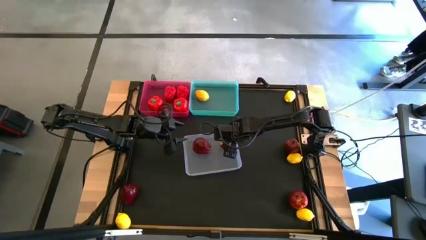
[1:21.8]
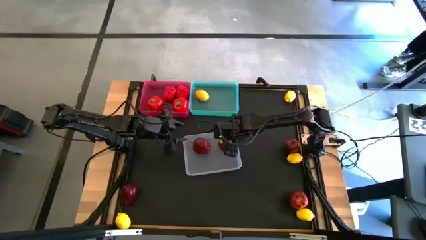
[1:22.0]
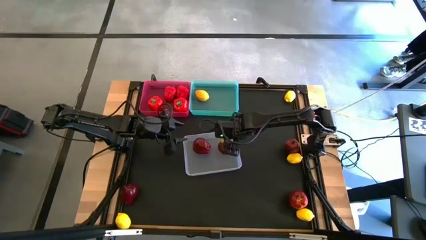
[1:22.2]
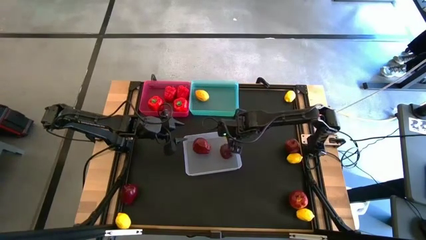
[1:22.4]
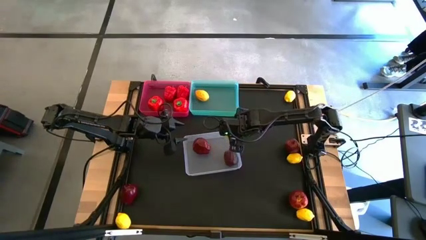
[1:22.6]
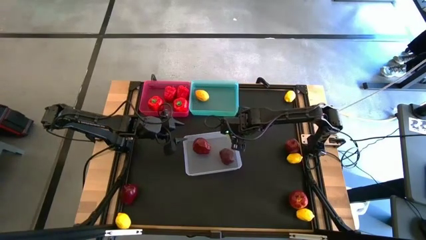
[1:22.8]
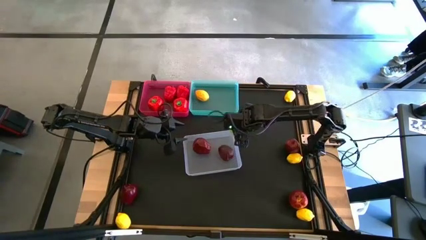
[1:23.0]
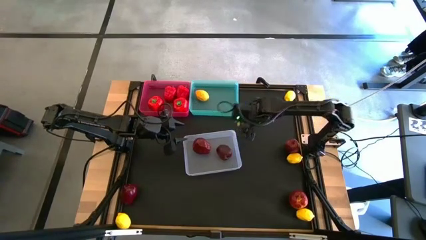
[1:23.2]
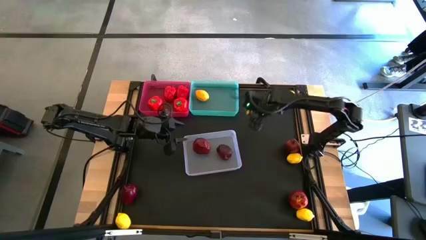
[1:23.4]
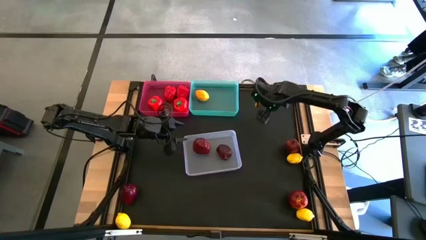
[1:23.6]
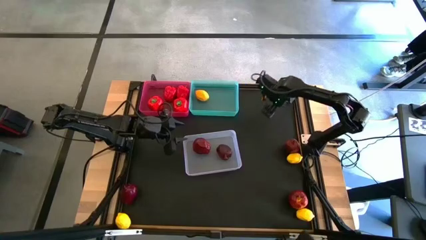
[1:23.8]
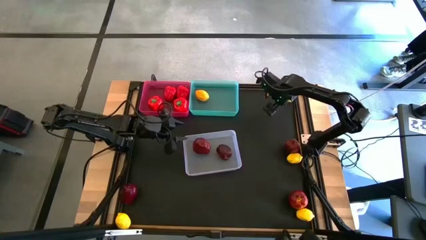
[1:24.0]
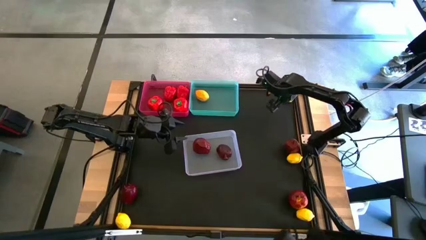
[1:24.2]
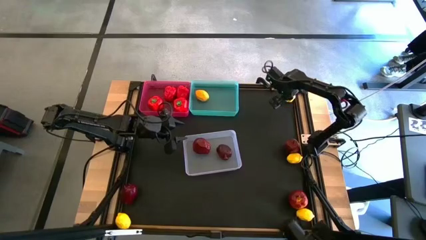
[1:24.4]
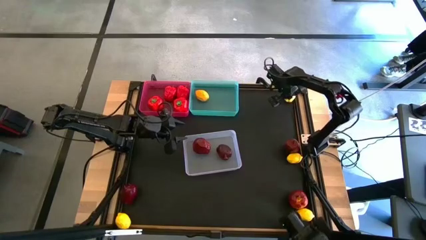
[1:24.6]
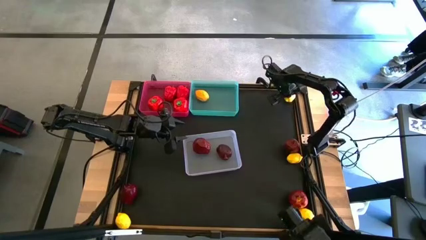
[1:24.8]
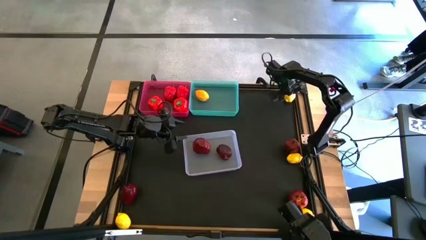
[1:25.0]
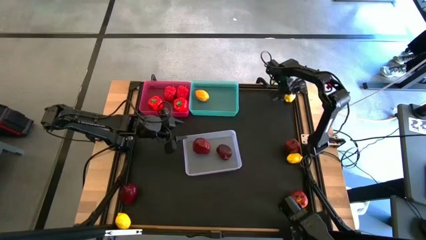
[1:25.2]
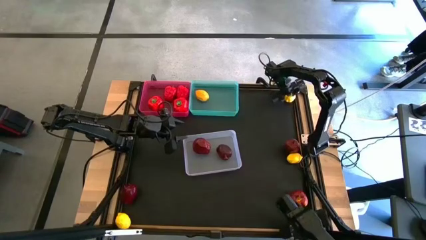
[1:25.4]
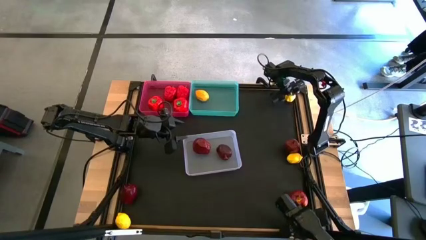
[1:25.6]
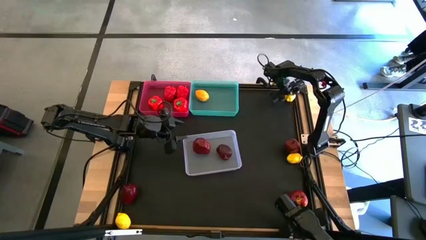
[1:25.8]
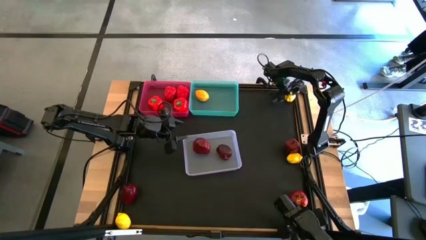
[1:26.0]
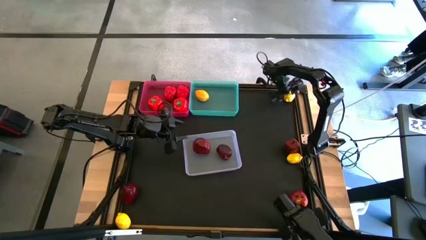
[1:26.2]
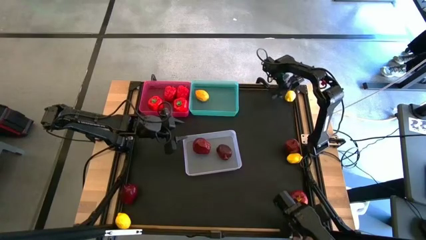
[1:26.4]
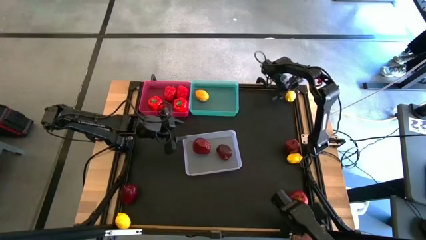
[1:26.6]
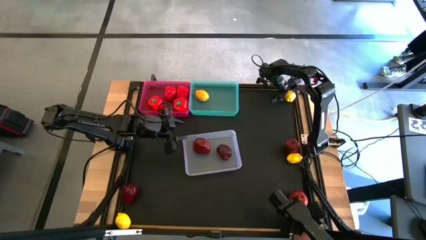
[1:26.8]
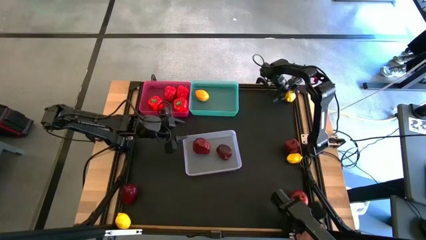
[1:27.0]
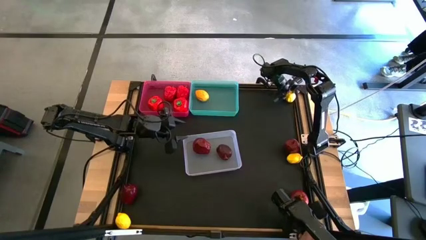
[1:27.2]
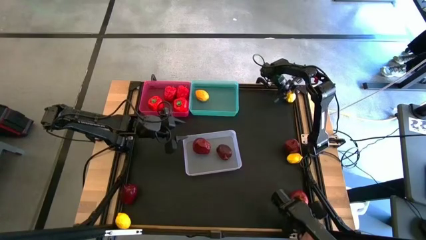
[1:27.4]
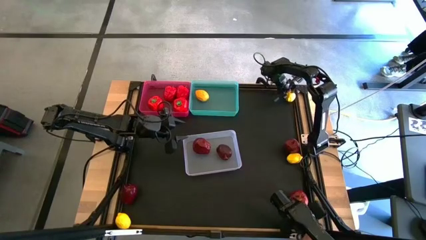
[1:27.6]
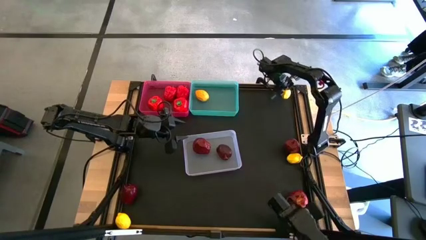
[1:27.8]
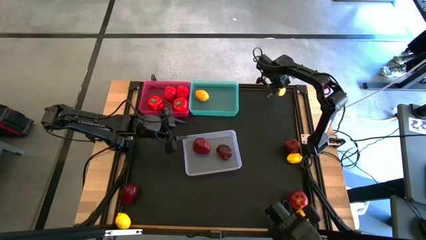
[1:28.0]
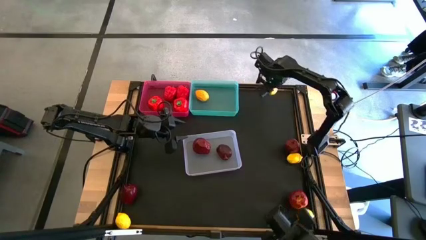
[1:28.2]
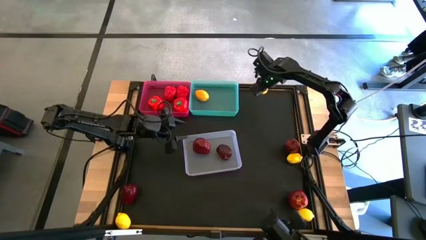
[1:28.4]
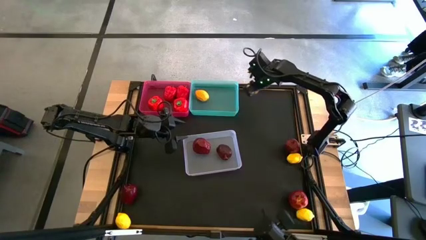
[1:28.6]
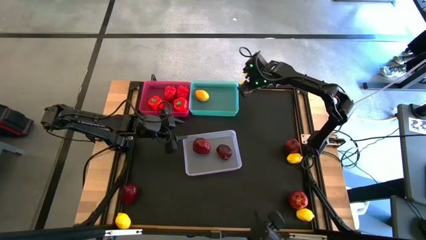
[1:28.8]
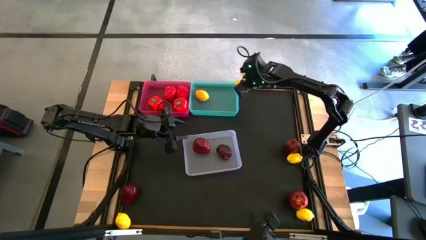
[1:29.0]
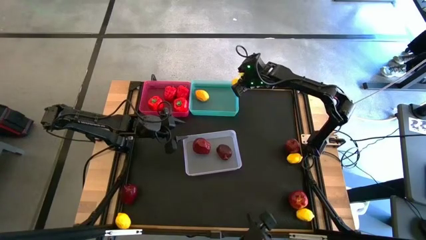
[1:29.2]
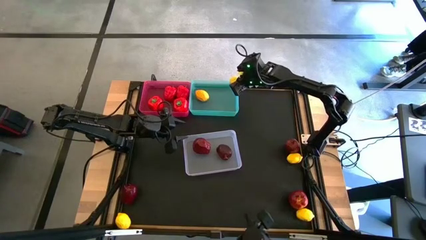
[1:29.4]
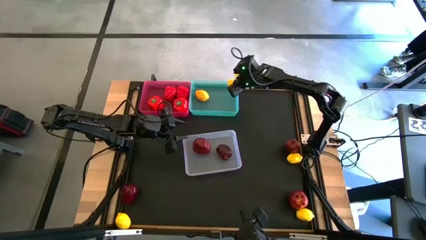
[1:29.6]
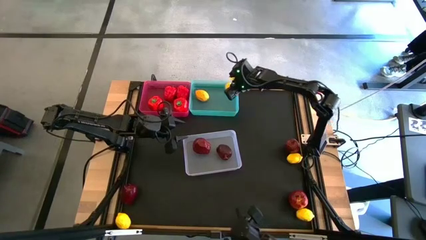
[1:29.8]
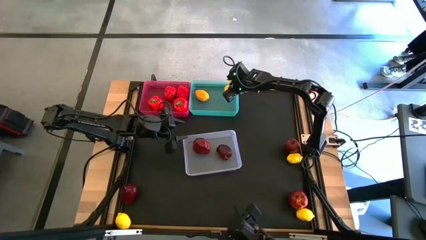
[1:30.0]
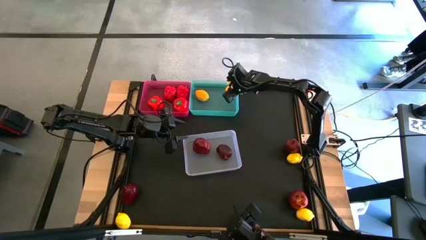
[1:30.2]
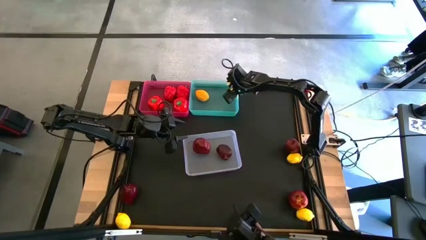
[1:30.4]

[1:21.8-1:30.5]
Task: Sort produce into baskets
Put the yellow lemon into the blue bin

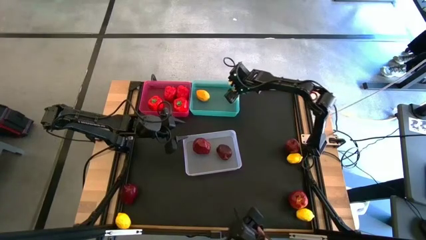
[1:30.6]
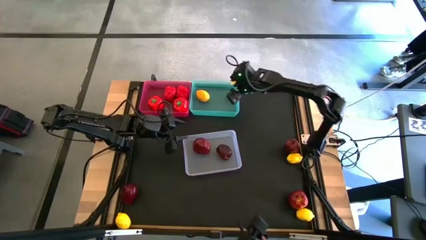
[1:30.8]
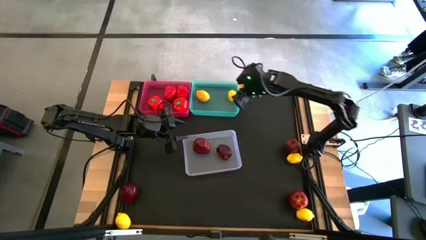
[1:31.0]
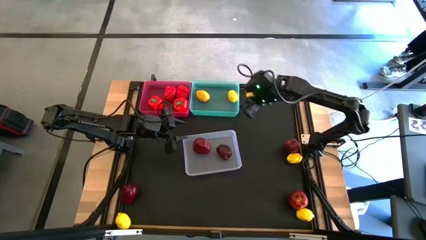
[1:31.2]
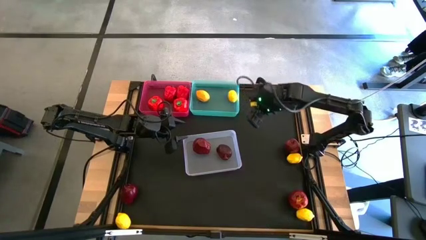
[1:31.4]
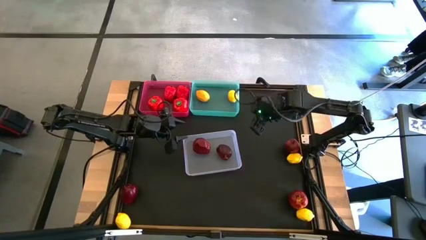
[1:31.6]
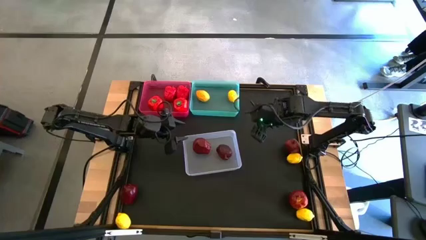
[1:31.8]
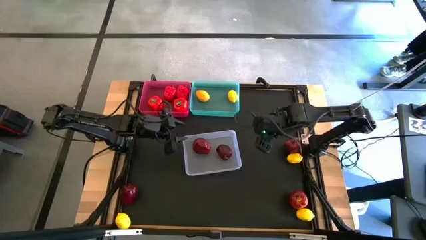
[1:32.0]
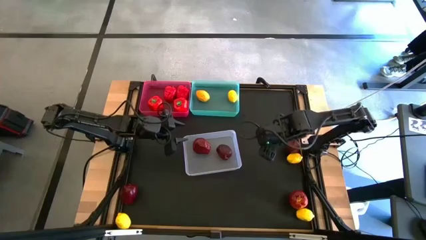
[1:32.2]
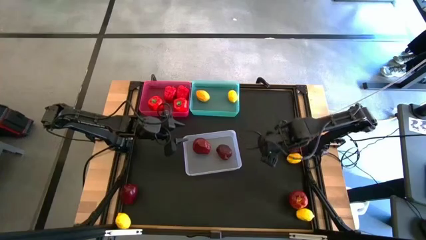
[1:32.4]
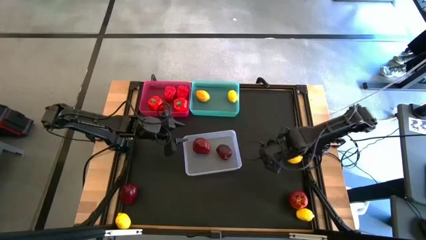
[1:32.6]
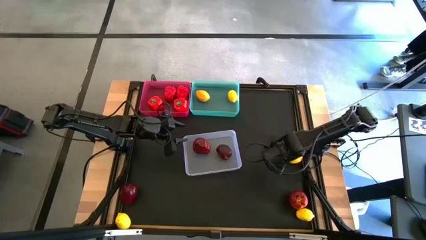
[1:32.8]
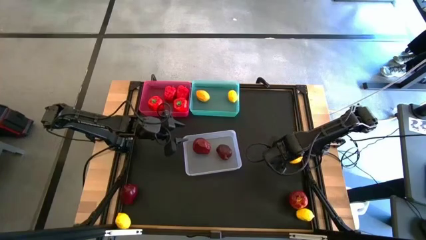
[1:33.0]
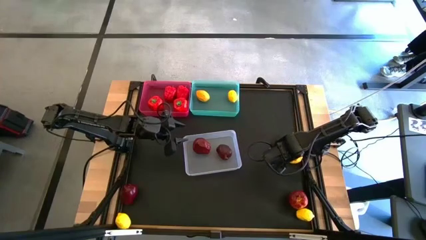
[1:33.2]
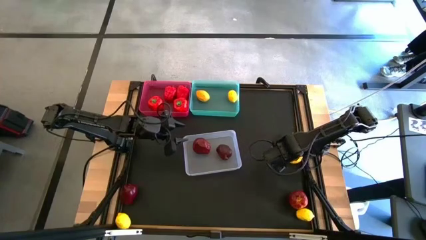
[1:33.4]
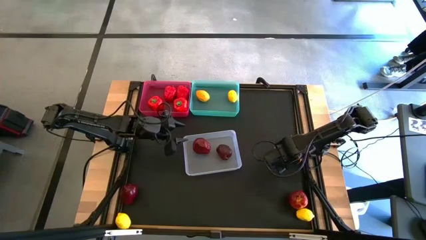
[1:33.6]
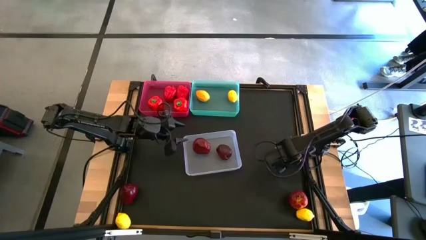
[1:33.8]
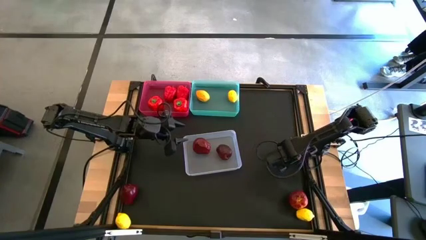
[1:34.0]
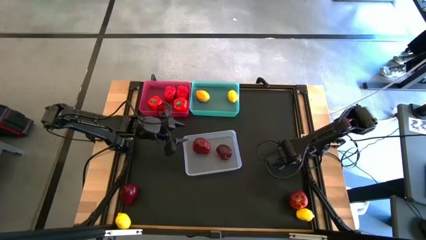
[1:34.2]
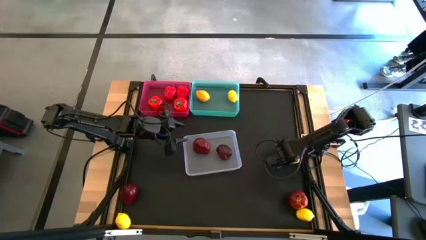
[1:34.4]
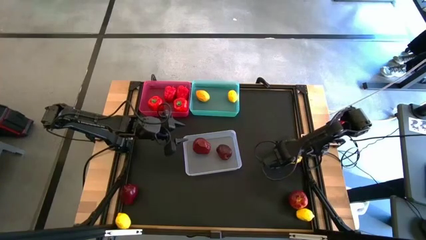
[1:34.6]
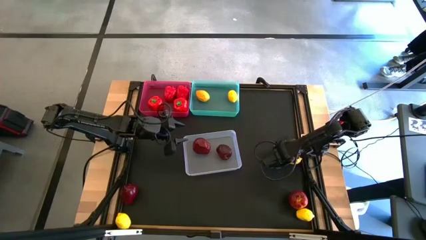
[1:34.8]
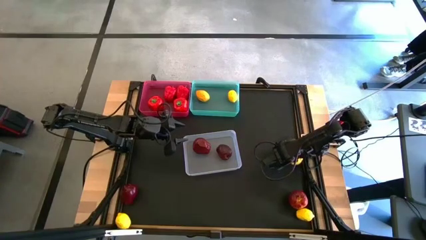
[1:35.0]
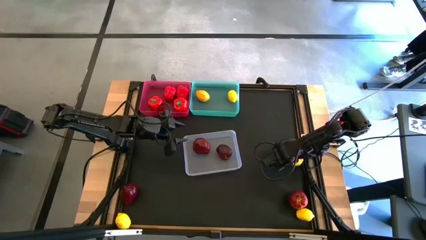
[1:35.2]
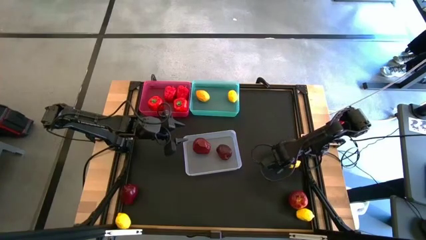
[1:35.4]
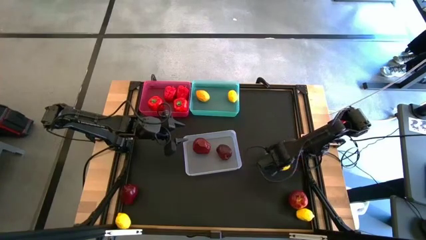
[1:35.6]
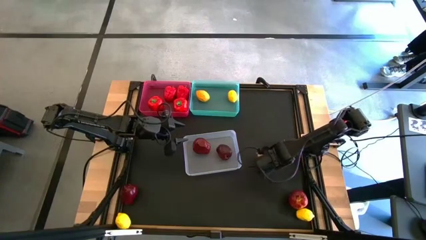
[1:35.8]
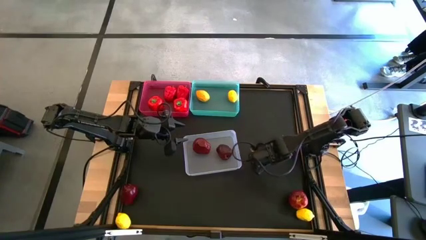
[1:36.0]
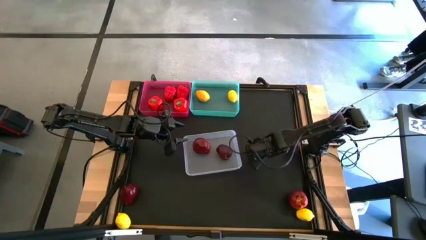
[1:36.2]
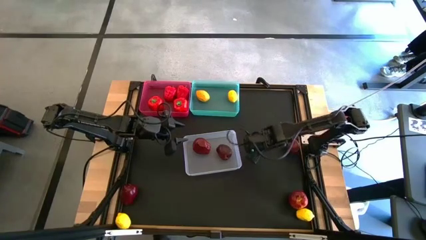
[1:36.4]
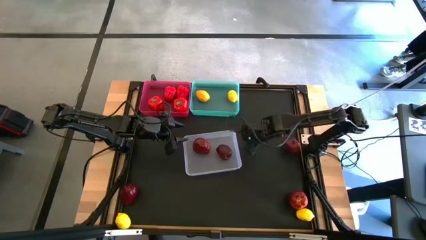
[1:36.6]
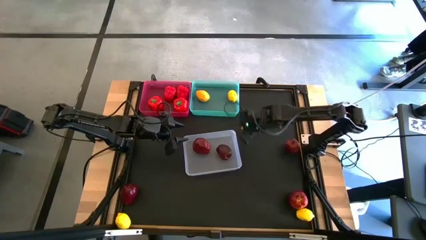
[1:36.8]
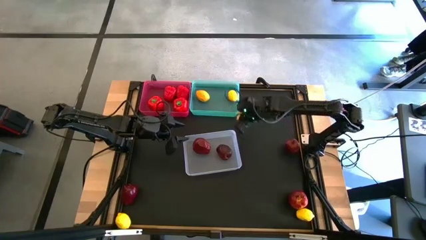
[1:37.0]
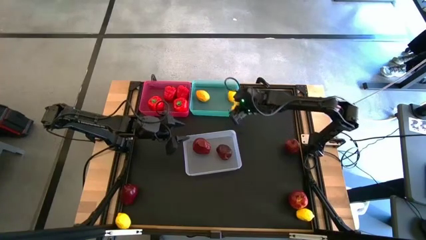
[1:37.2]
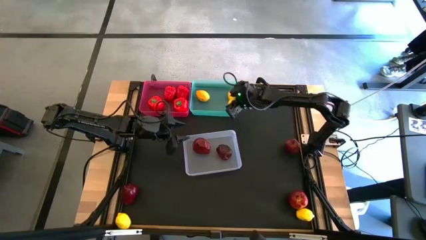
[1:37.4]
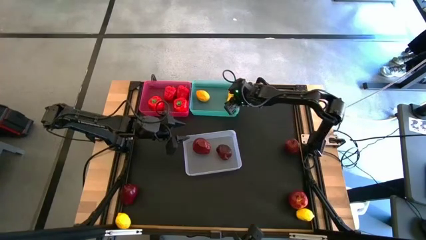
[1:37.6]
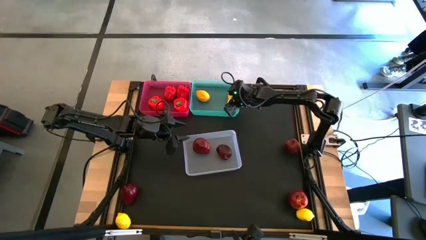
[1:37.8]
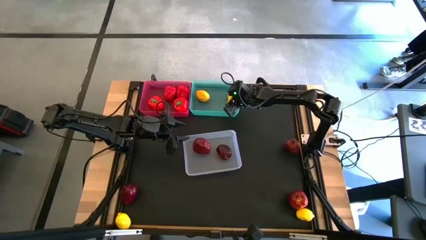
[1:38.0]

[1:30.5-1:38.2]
Put the yellow lemon into the blue bin
